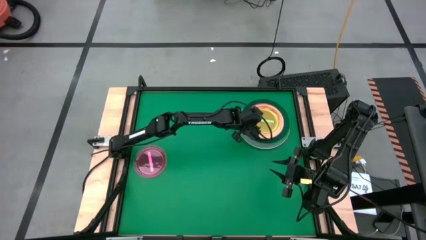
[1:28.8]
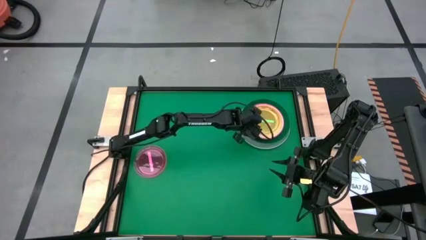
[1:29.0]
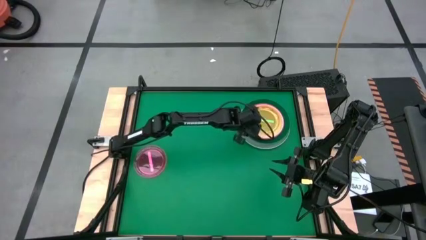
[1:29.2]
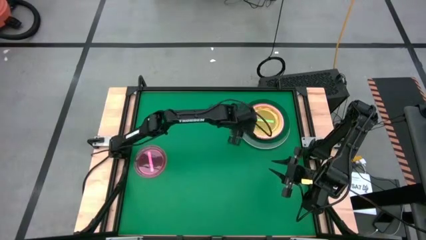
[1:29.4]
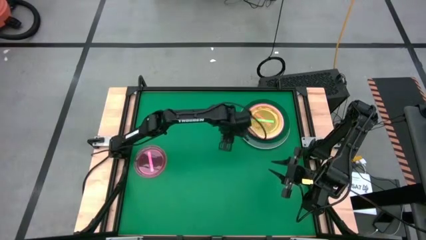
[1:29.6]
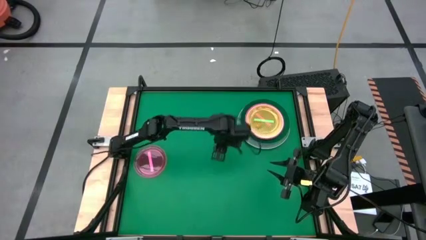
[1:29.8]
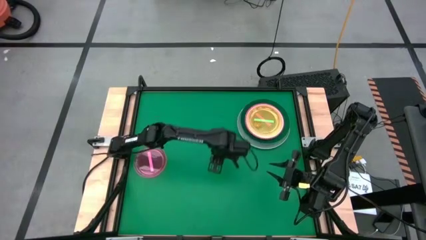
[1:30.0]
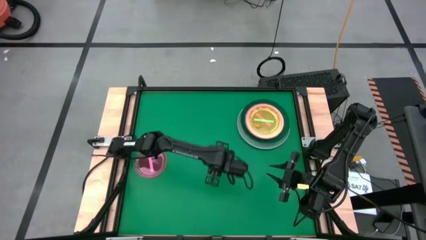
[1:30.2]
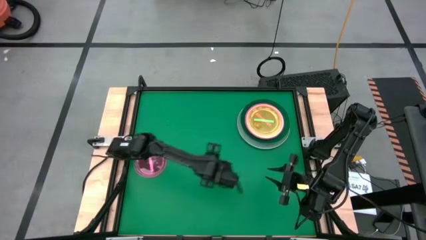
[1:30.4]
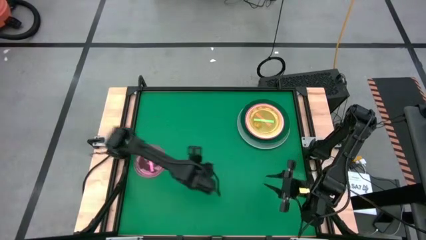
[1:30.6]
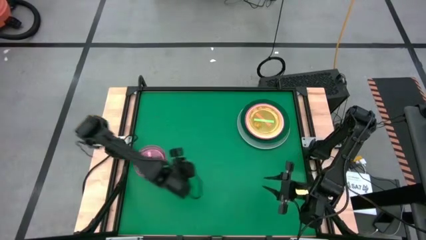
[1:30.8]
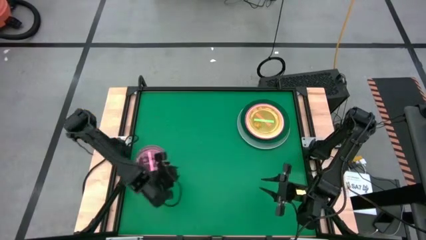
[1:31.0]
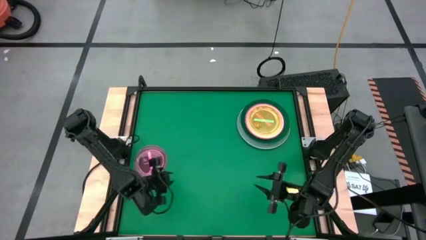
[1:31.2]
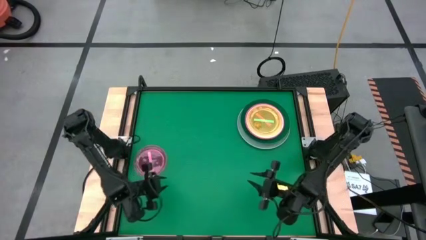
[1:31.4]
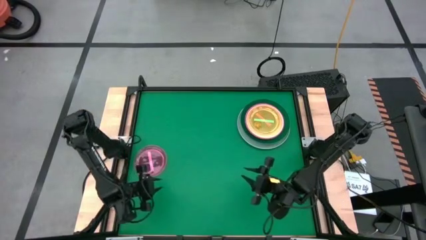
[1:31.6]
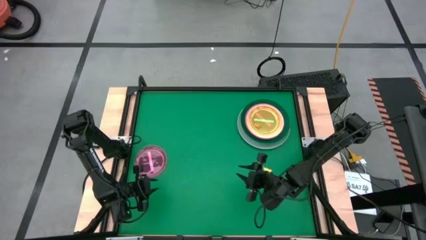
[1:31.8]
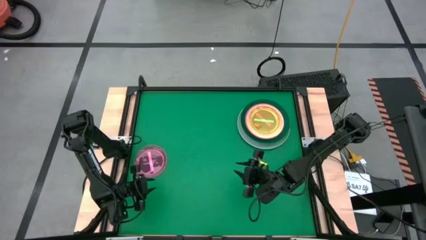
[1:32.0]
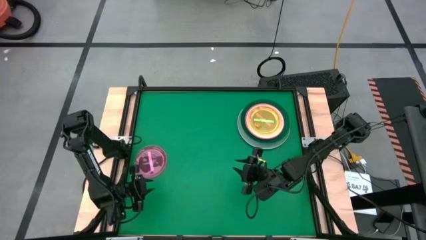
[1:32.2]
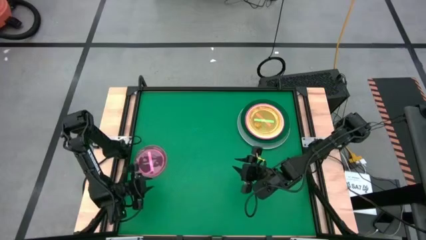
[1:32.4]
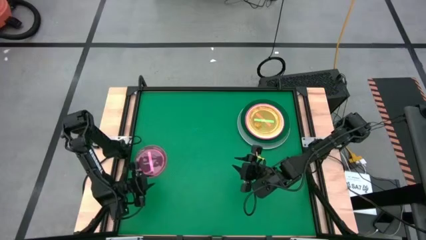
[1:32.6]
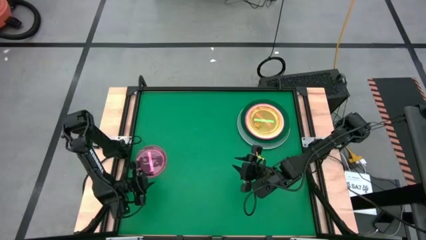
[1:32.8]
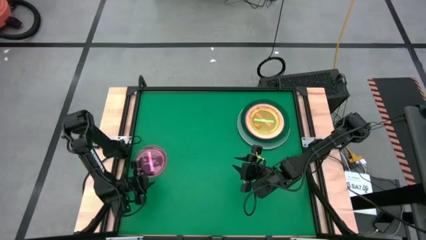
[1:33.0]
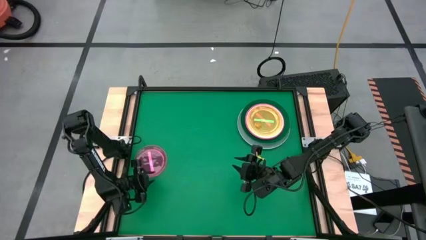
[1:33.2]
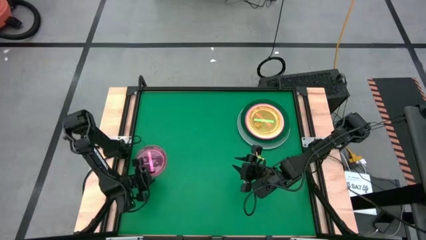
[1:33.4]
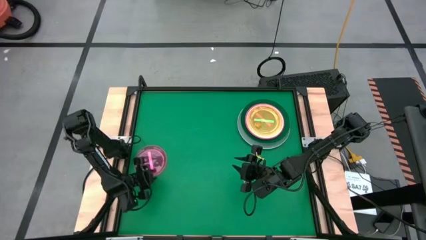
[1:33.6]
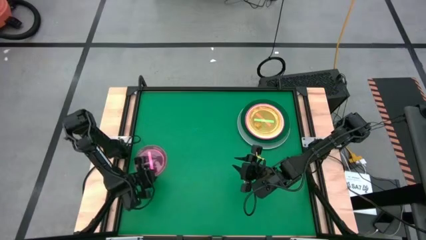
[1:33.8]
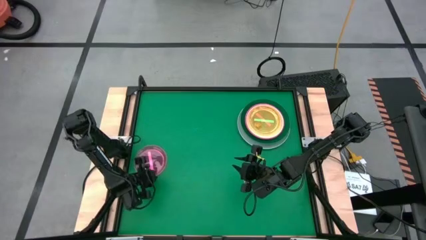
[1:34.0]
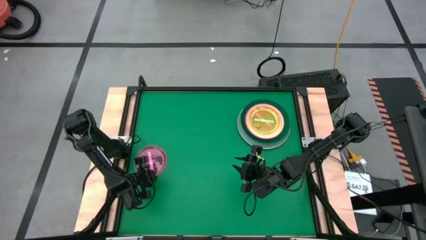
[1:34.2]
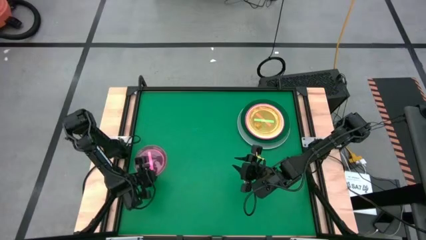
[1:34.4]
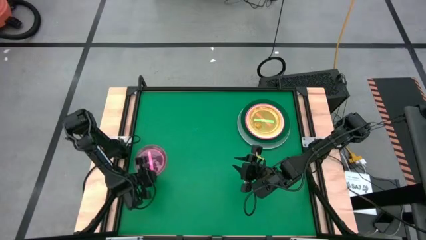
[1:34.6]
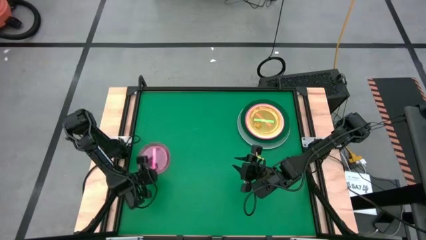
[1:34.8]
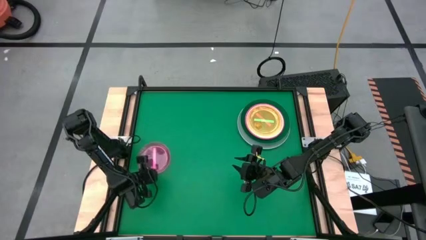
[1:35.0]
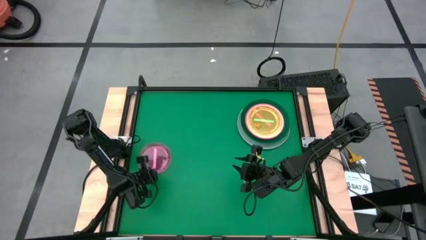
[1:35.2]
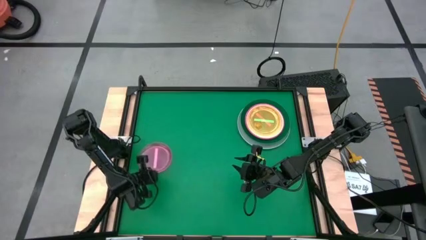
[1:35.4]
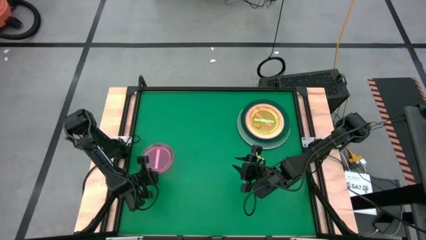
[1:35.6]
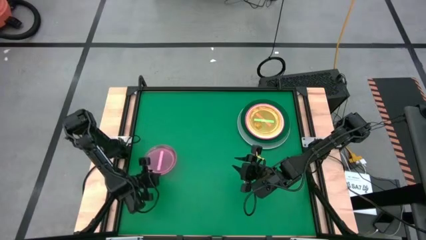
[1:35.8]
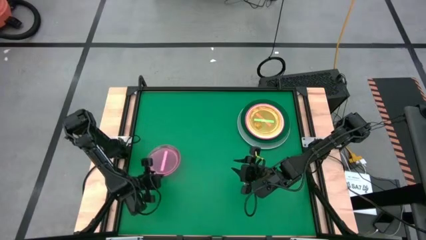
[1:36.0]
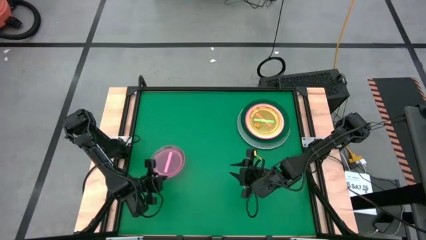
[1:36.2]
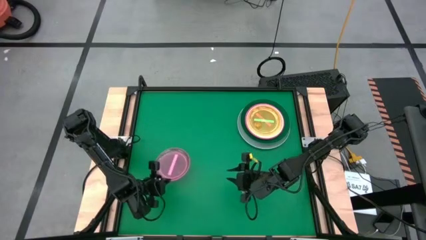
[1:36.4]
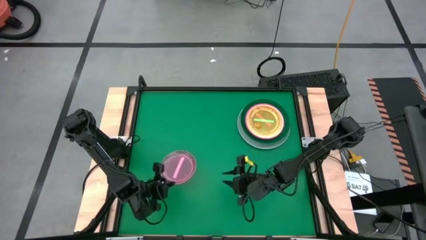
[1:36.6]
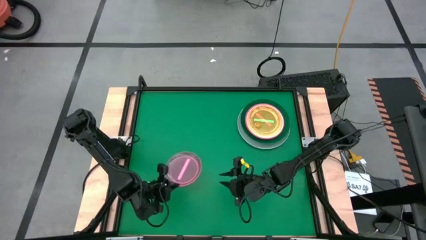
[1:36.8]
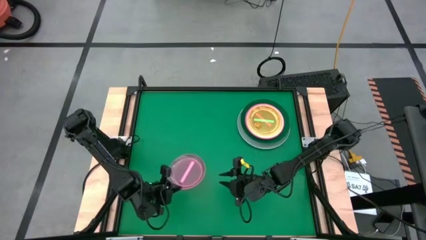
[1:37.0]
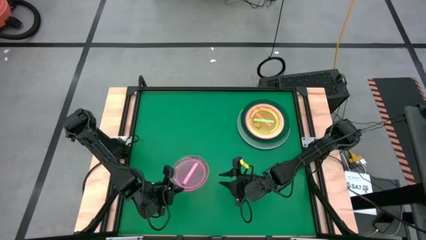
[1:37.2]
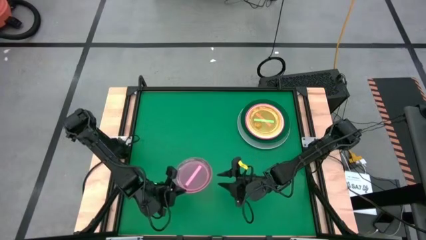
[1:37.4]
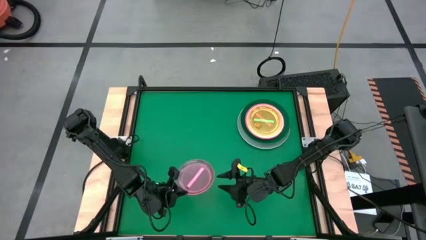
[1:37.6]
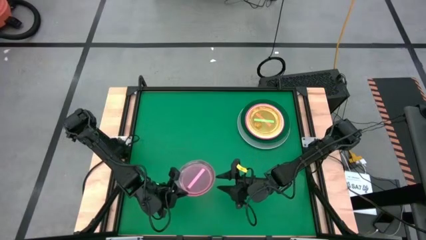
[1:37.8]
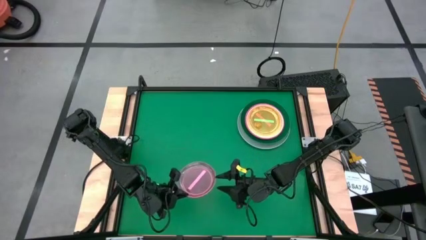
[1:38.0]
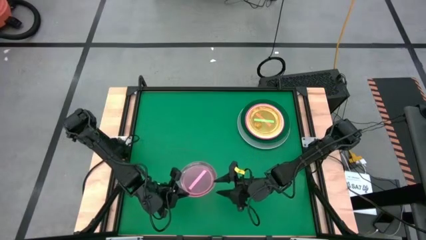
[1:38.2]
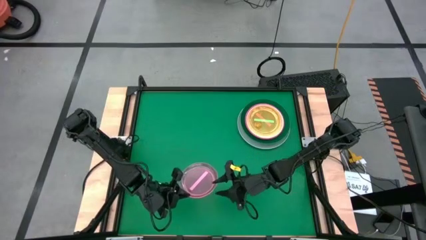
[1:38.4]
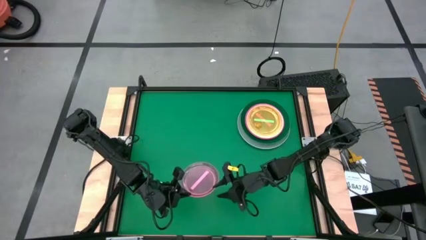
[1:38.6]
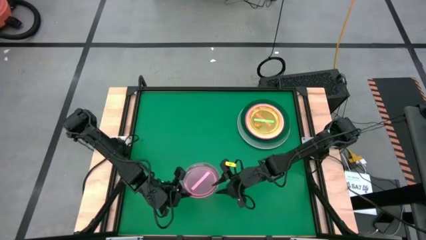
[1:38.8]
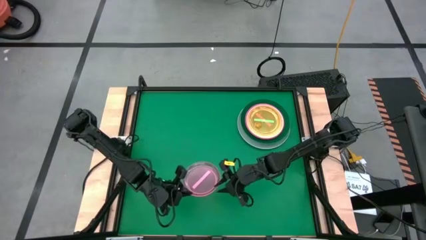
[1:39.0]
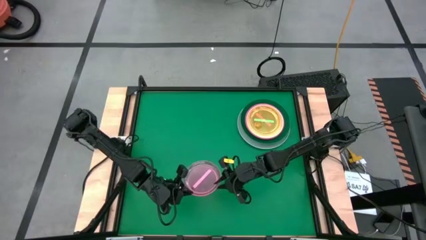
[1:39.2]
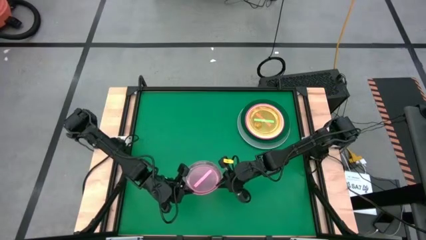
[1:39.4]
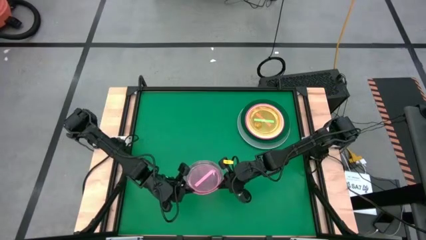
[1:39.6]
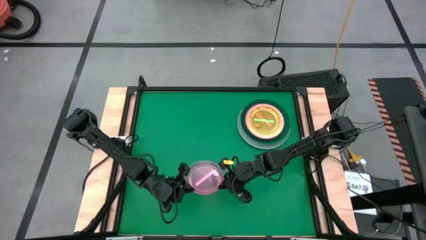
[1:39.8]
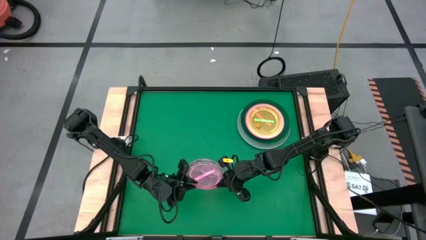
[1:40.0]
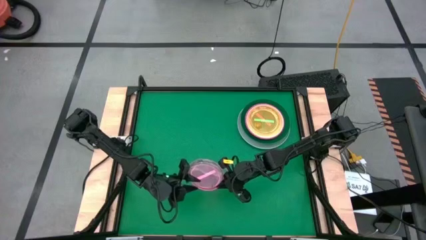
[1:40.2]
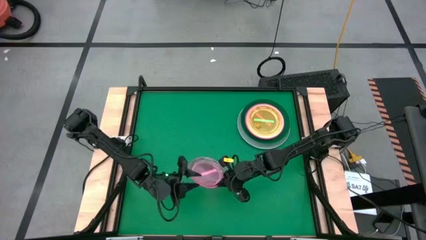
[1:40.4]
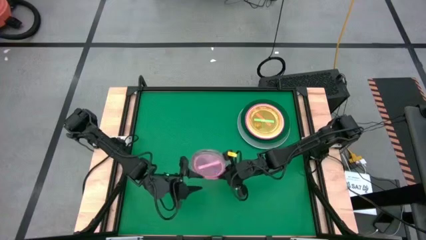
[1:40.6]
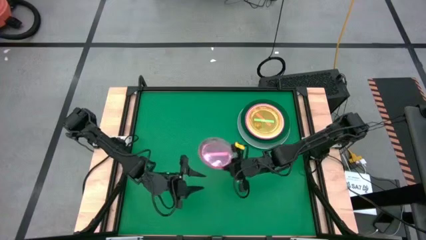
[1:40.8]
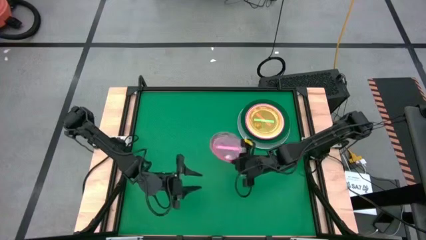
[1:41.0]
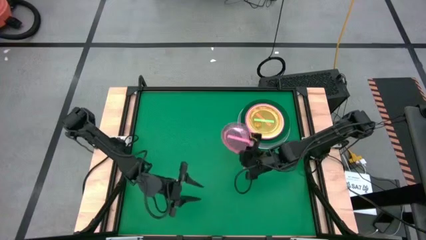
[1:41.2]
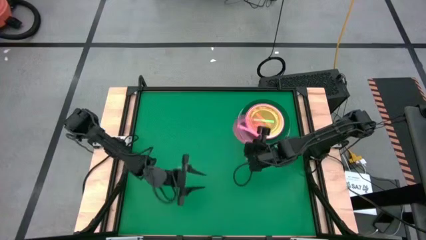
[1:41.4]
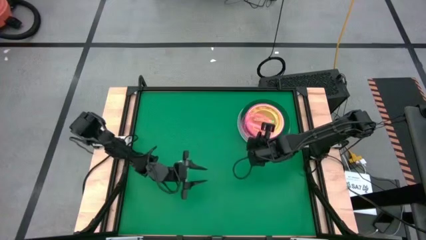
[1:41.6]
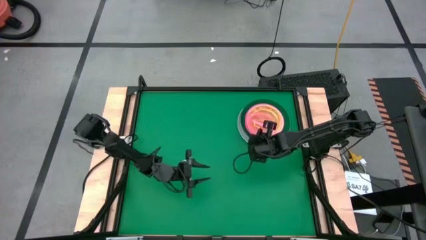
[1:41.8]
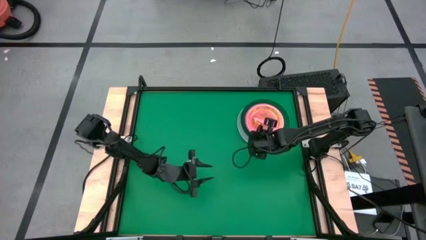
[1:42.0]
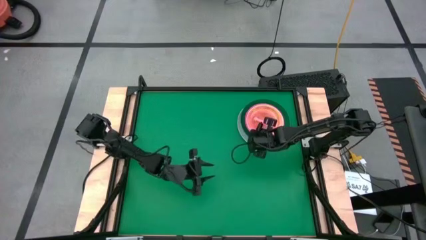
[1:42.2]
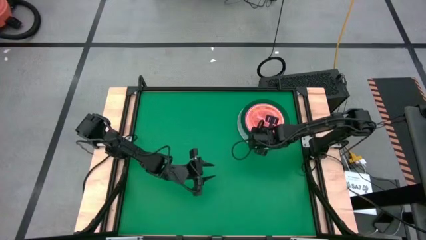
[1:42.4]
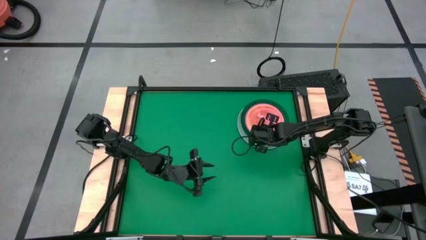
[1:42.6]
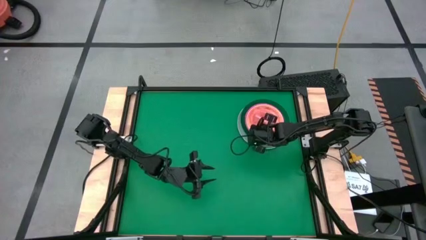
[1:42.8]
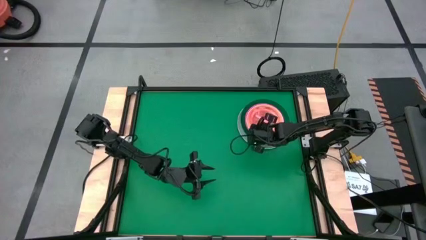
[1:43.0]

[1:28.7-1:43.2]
Task: Stack plastic plates
Stack the pink transparent plate on the green transparent plate
